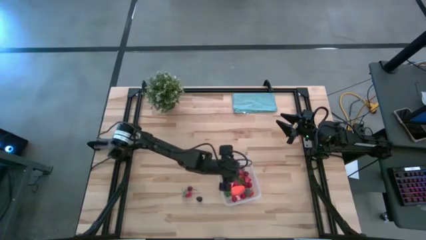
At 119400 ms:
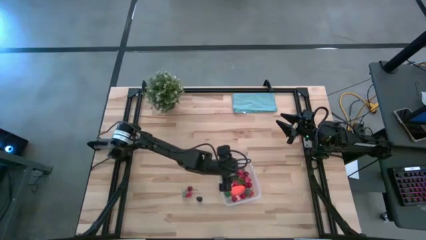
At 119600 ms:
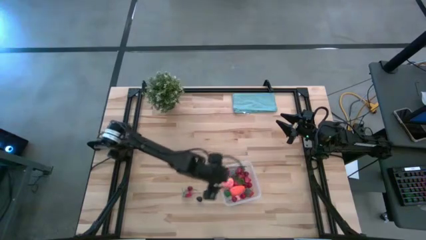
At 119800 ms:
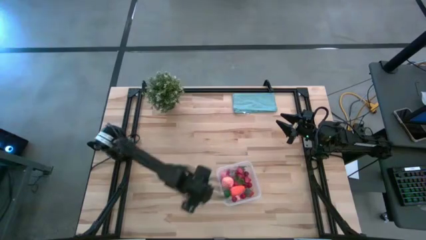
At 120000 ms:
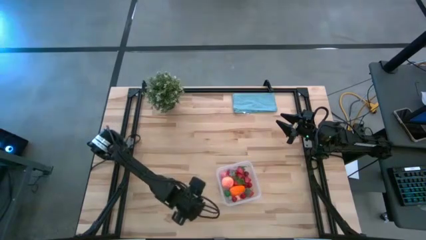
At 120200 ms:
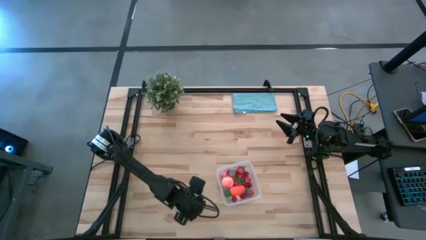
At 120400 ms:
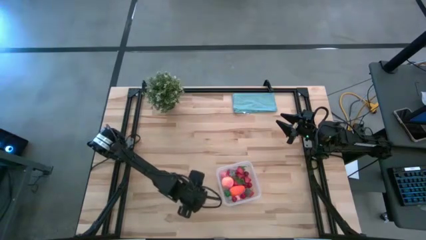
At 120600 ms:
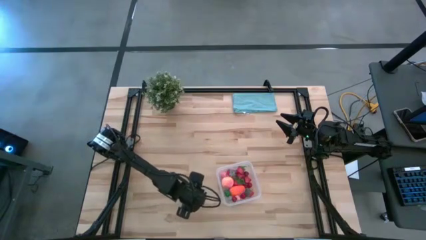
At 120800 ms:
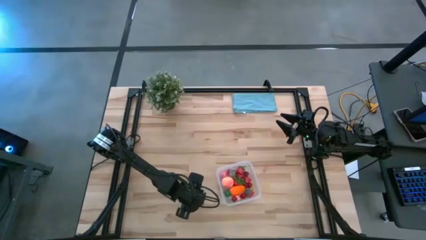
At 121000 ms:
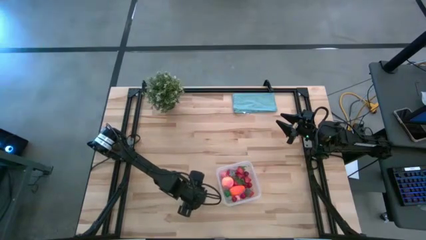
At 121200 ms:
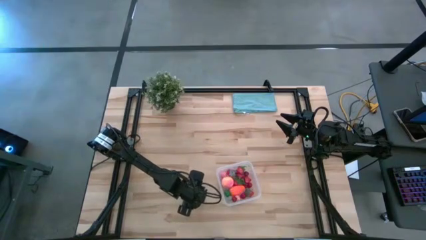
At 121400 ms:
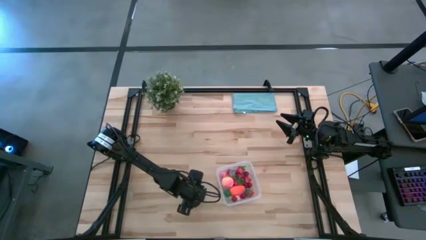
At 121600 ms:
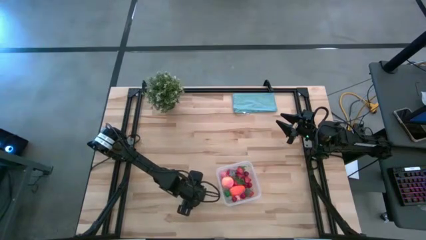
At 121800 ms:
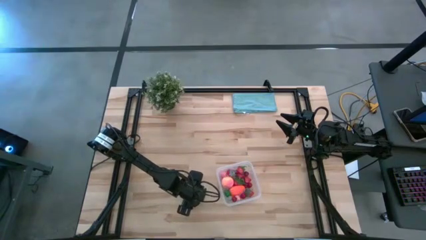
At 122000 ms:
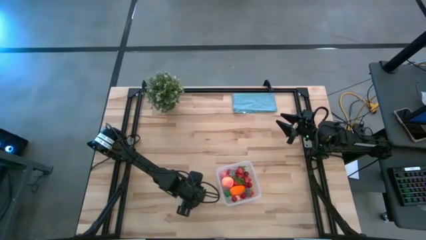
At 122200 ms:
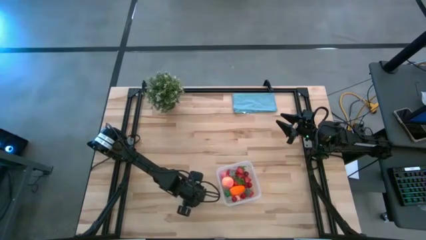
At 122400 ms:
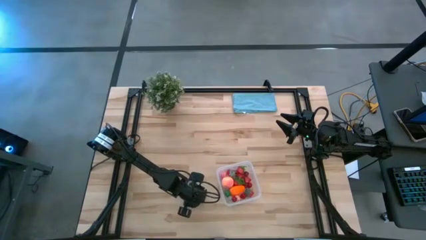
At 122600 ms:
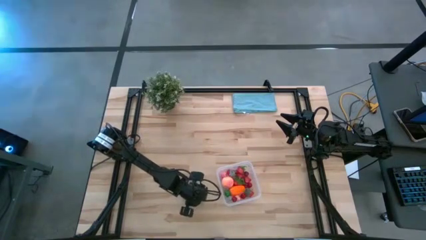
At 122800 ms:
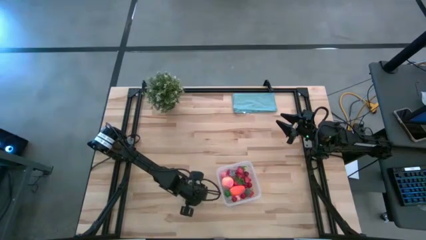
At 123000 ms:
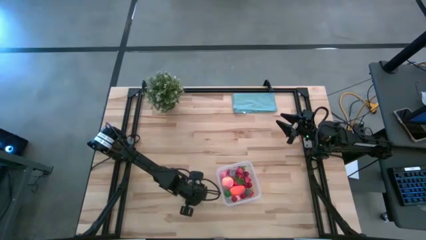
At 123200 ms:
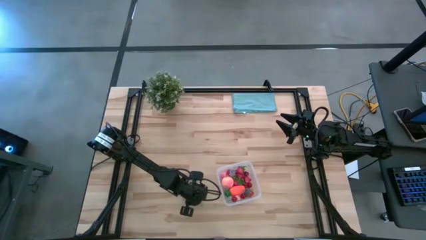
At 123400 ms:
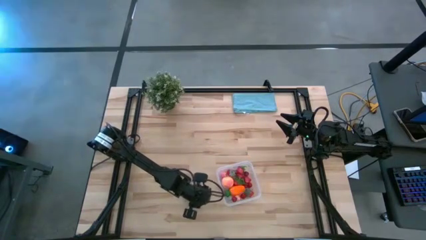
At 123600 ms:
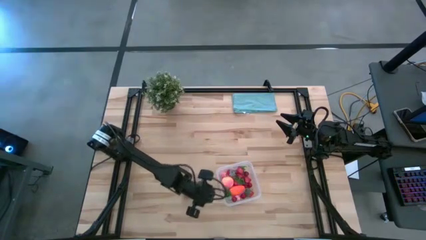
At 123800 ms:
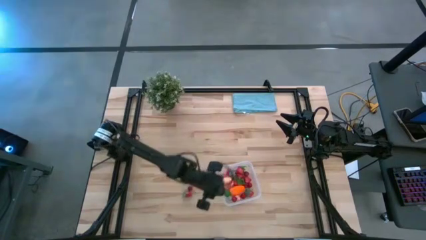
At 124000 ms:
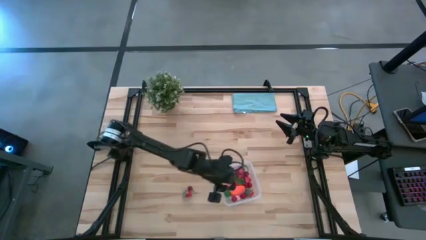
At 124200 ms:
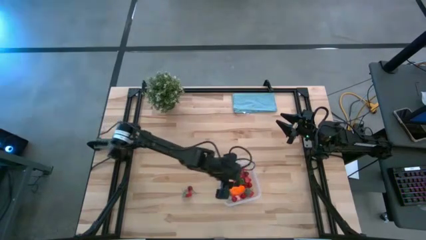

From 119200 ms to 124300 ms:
Task: Pick and placing Produce into tupperware
Put the blackberry into the transparent container

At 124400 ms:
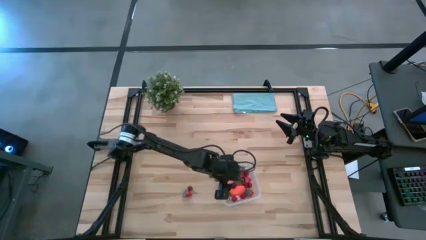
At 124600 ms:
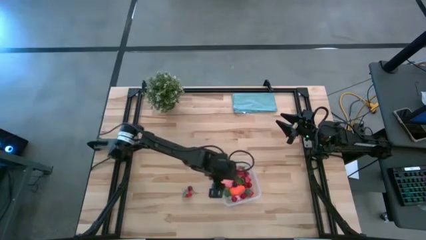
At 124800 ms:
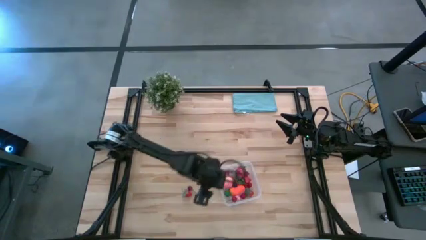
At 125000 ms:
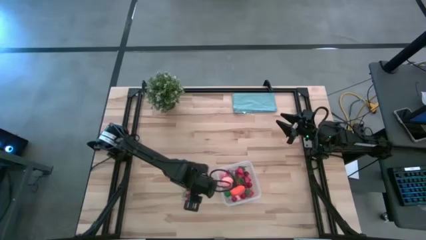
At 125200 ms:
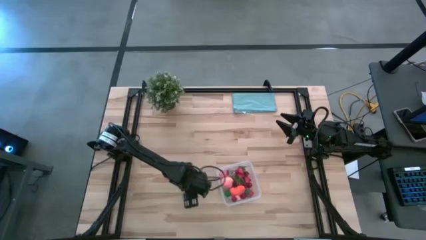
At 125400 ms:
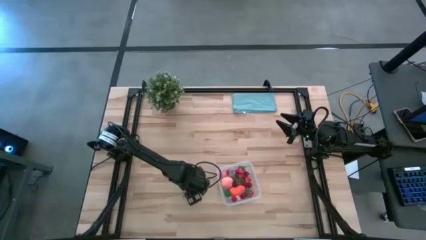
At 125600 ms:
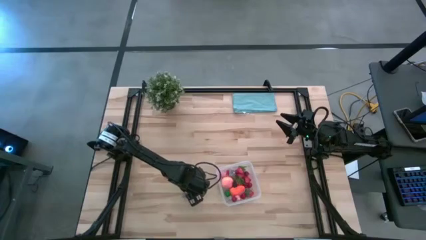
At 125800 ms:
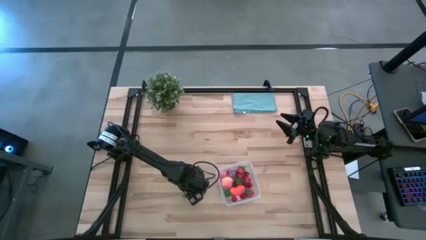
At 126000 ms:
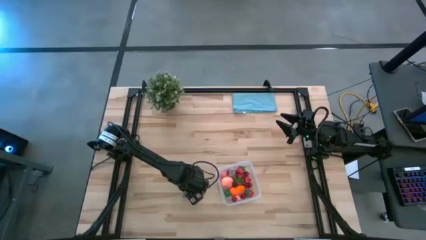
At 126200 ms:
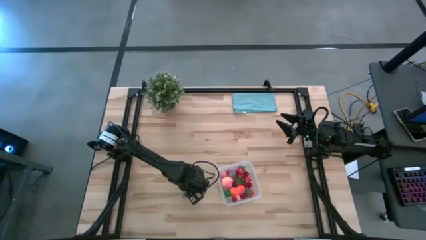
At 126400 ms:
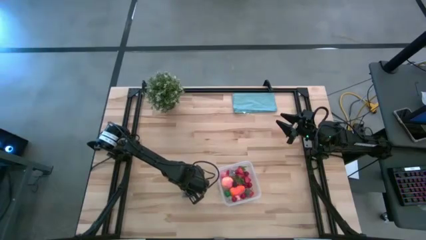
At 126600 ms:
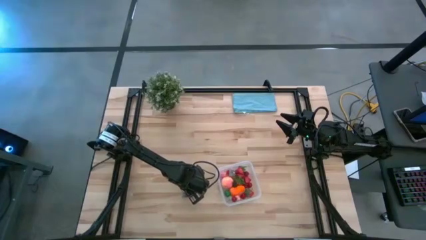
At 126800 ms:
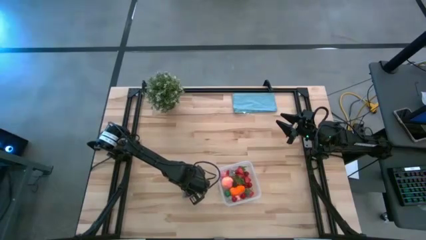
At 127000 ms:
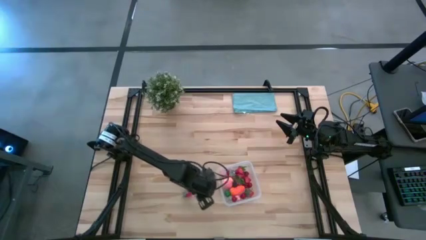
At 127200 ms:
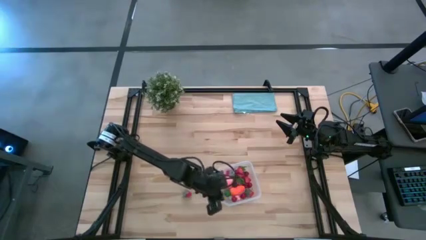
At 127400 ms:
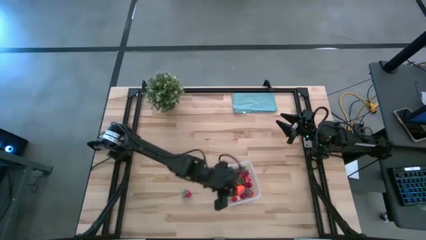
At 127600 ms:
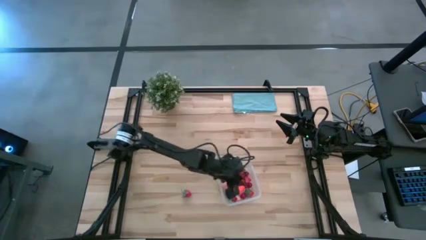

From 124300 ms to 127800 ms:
Put the red cherry into the transparent container

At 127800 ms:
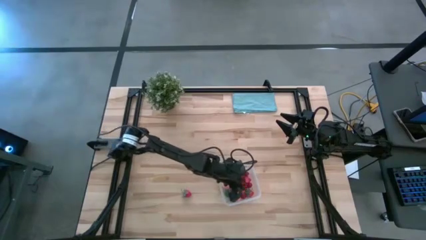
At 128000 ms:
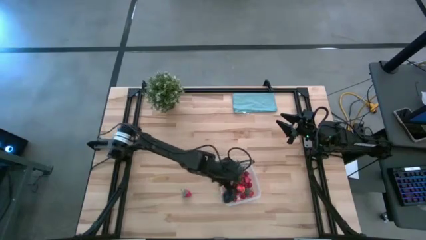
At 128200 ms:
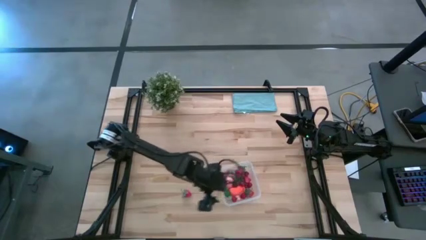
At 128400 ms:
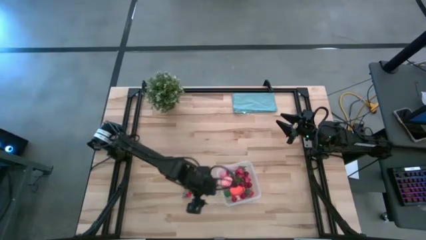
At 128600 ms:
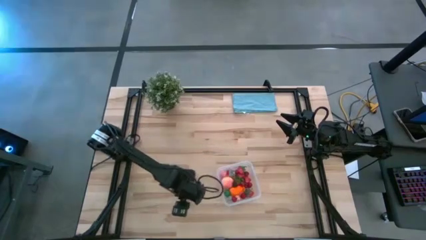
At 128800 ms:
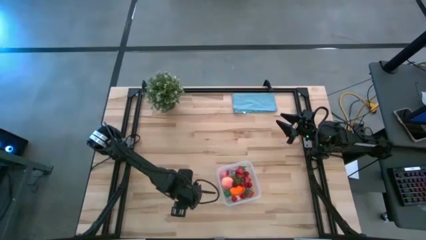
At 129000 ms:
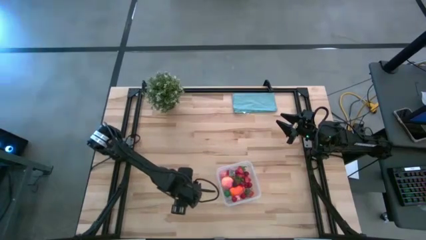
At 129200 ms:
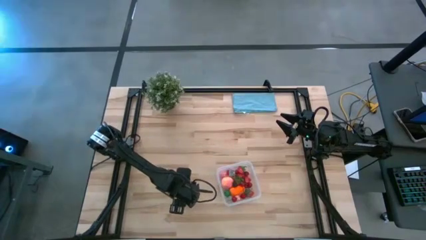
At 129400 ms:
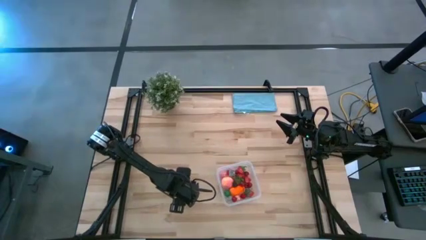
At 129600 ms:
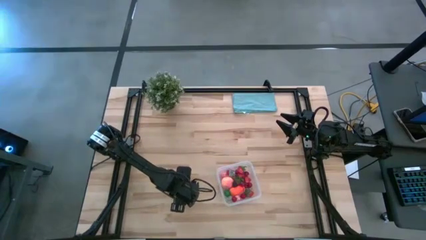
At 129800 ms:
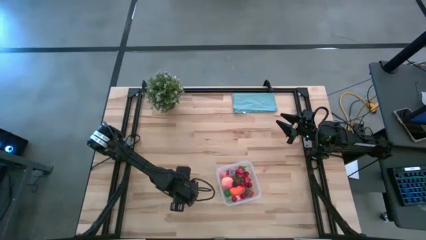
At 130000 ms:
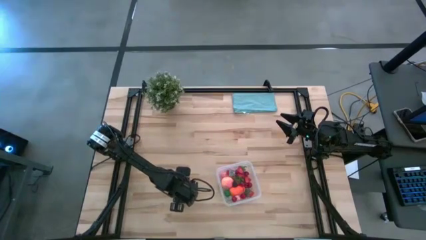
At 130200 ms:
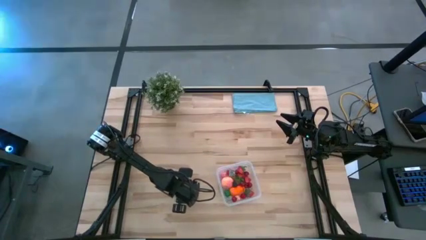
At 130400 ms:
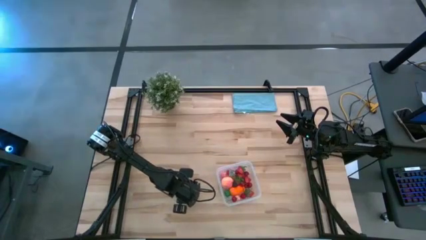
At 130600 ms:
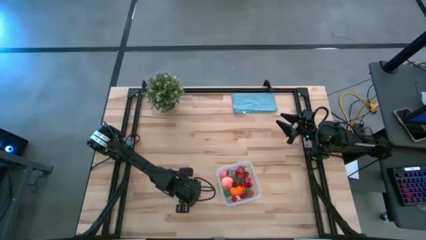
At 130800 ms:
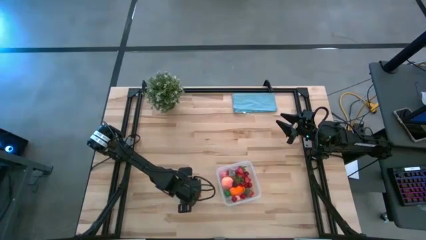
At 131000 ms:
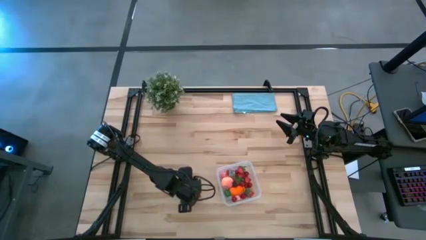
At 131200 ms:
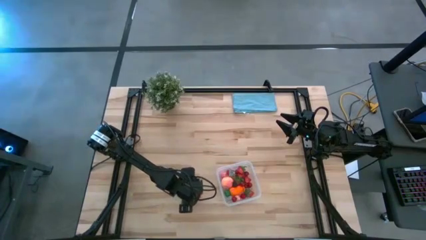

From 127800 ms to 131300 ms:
Put the red strawberry into the transparent container

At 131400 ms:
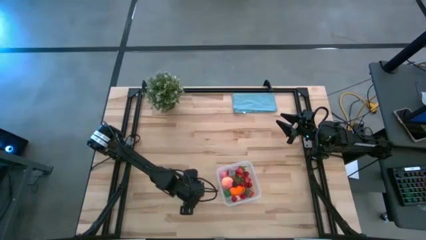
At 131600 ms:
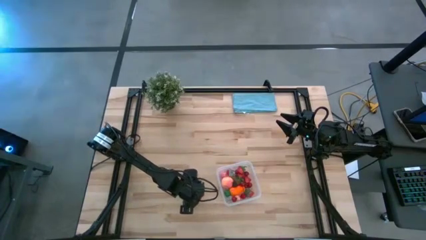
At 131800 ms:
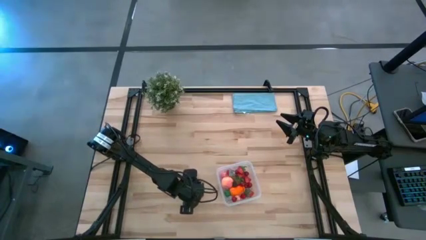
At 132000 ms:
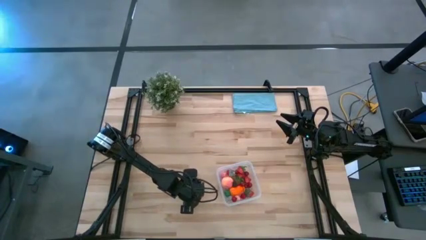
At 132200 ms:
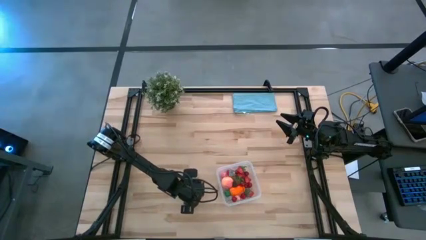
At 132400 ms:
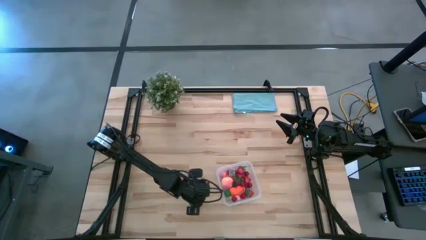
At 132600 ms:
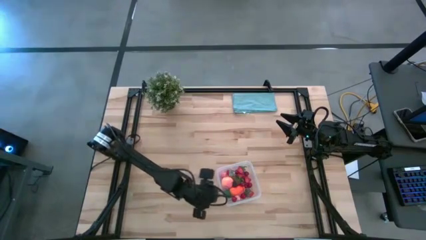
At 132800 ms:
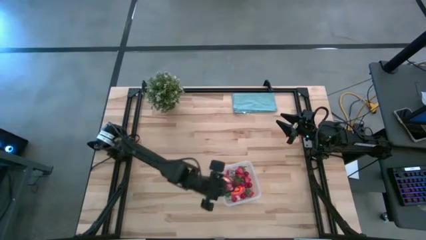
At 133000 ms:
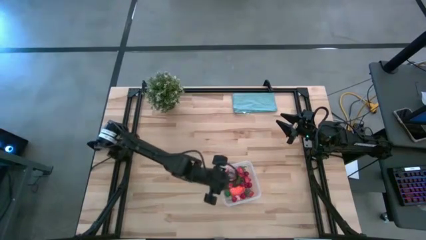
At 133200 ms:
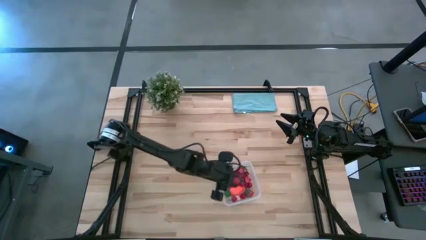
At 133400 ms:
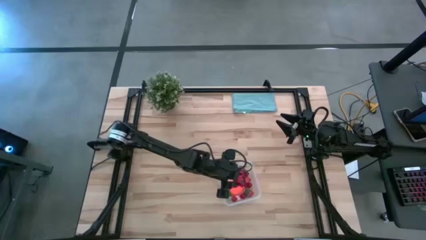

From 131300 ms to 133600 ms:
Put the red strawberry into the transparent container

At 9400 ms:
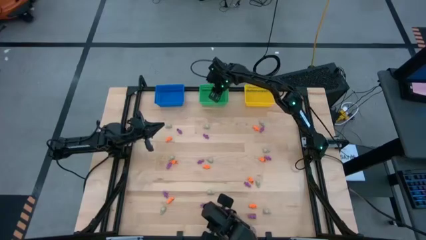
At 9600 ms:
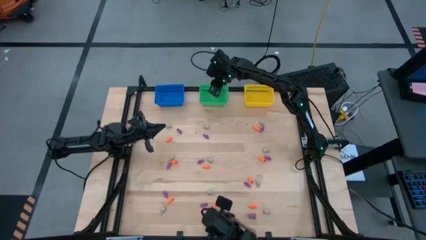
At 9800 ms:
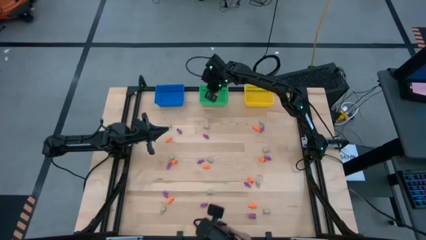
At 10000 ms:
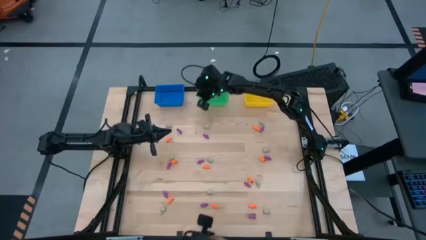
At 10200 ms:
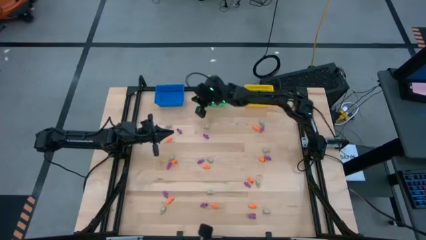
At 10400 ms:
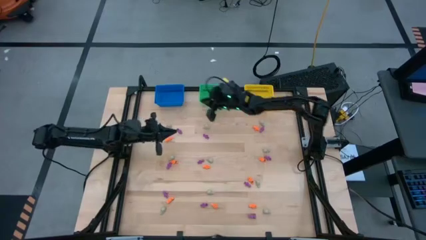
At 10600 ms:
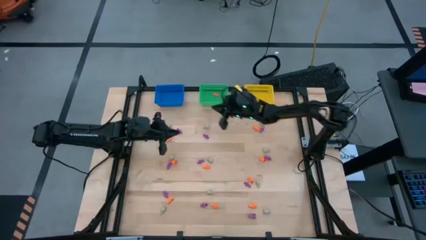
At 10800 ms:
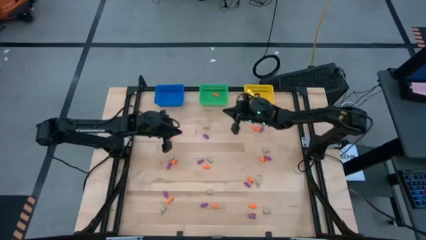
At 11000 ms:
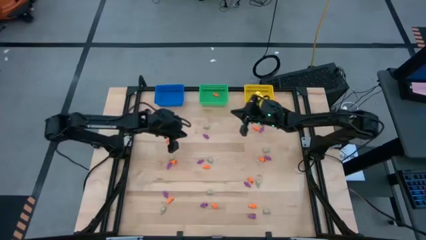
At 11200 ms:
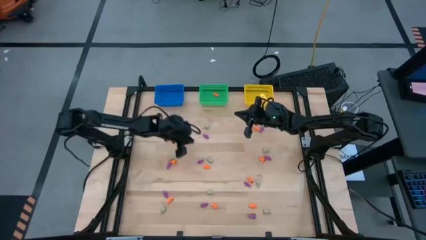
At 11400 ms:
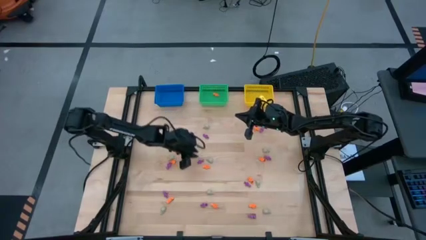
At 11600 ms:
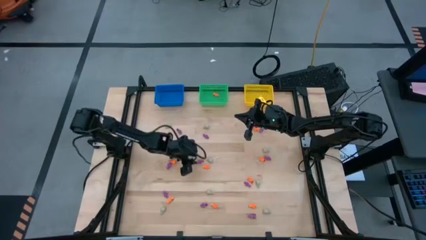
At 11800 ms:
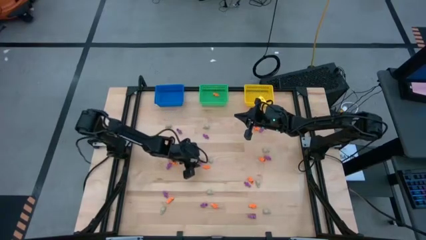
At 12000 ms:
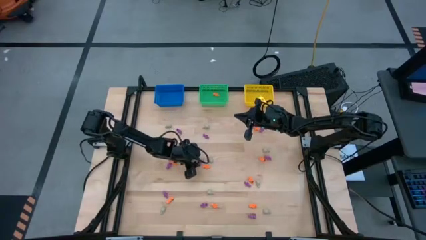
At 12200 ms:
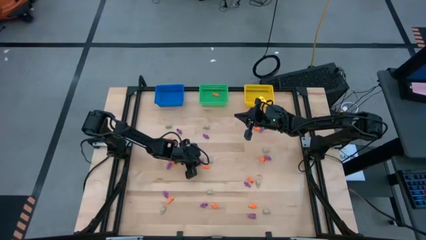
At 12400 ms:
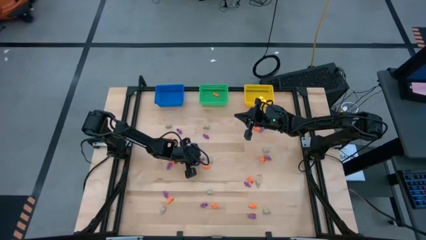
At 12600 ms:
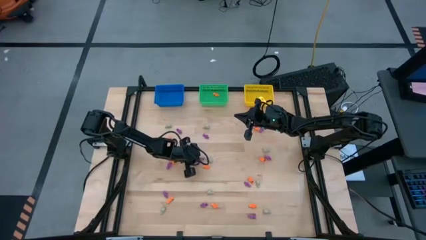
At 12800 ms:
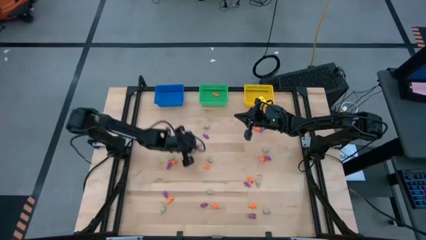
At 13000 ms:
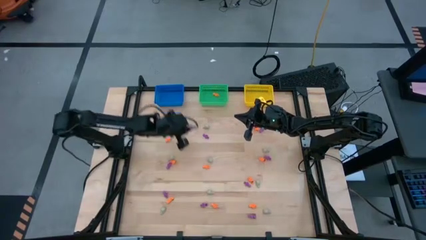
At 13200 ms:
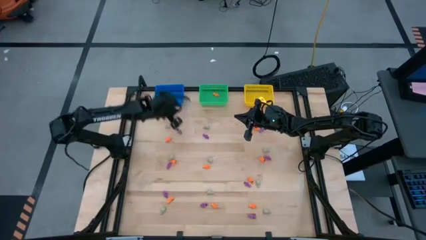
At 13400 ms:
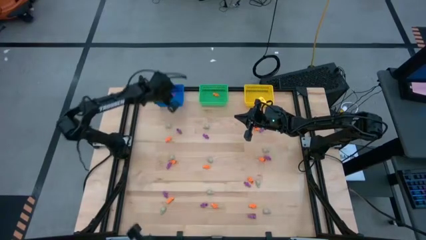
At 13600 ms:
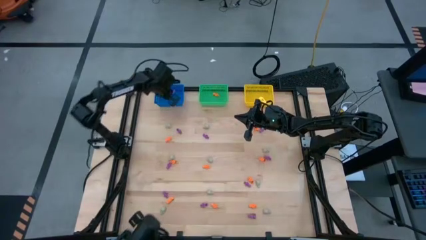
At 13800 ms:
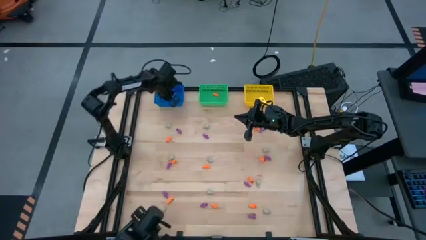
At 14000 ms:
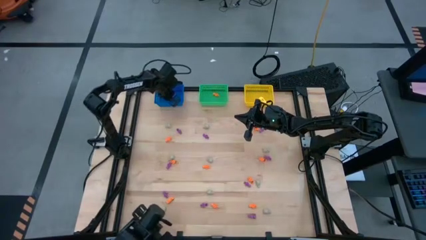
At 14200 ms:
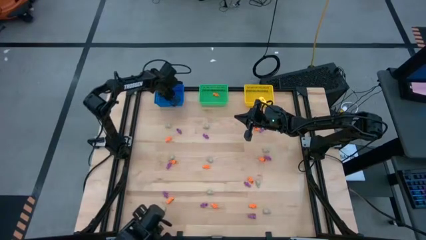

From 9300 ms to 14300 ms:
Task: Sort Halloween decoration
Put the purple skeleton toy into the blue basket
